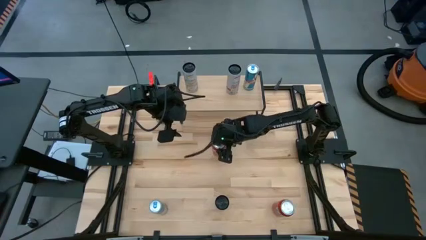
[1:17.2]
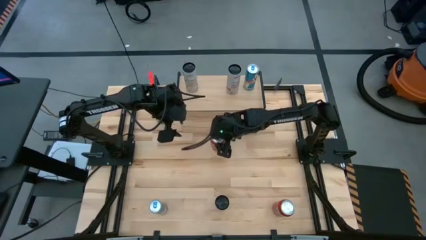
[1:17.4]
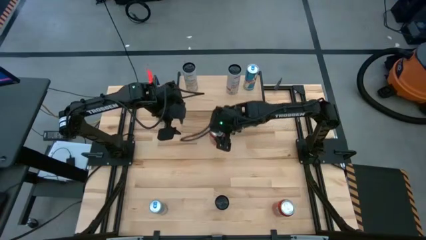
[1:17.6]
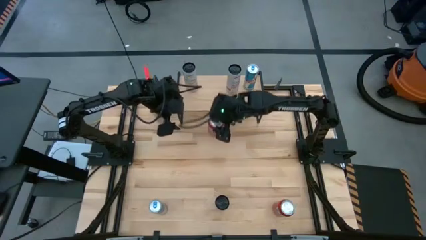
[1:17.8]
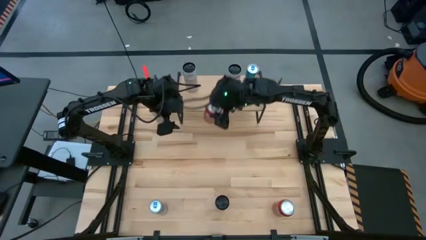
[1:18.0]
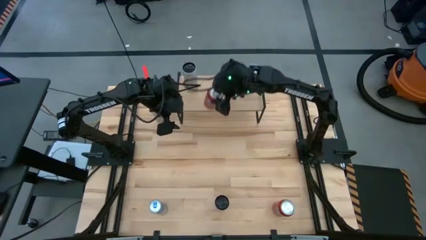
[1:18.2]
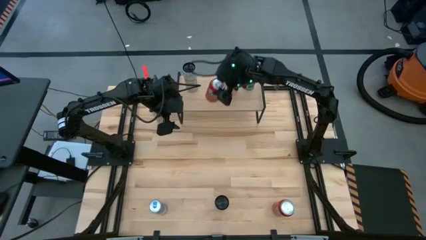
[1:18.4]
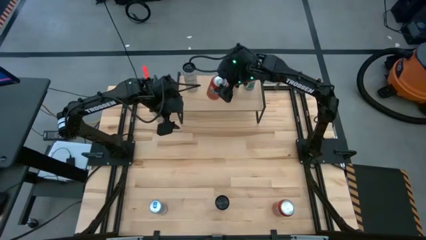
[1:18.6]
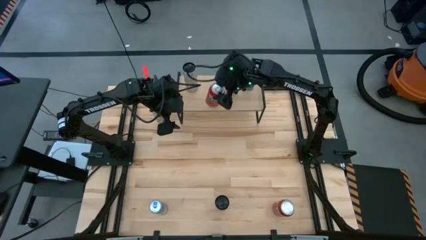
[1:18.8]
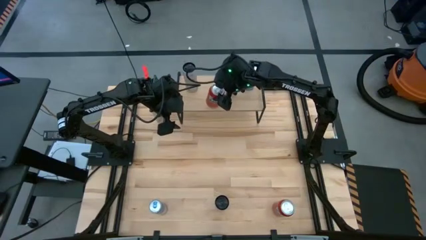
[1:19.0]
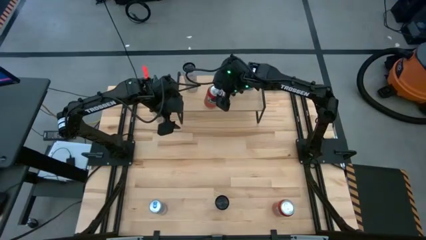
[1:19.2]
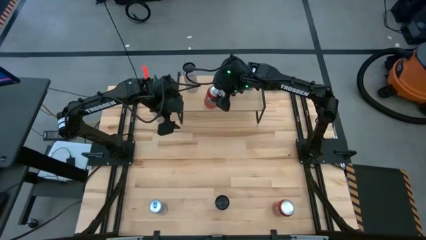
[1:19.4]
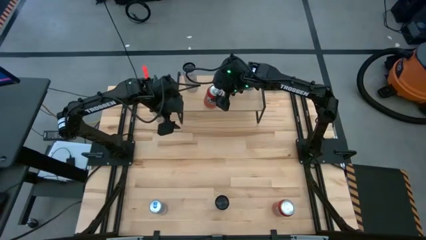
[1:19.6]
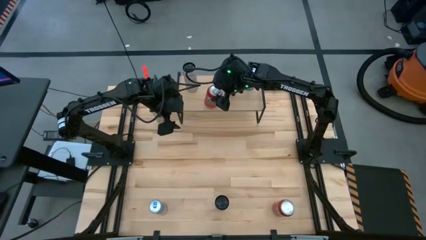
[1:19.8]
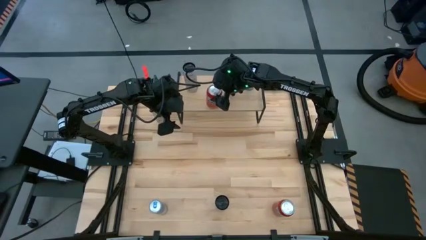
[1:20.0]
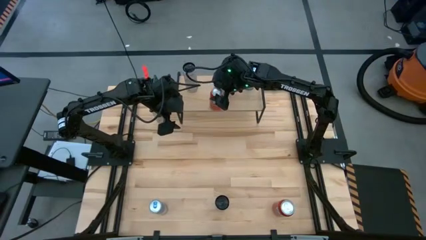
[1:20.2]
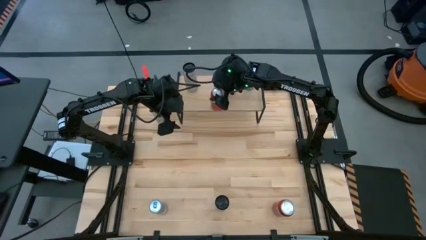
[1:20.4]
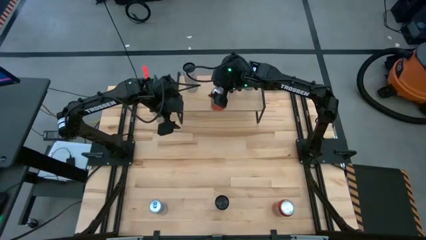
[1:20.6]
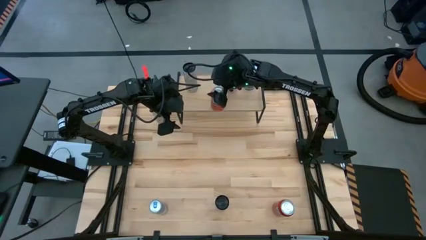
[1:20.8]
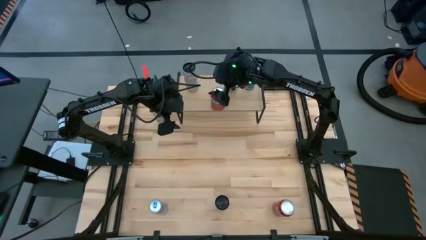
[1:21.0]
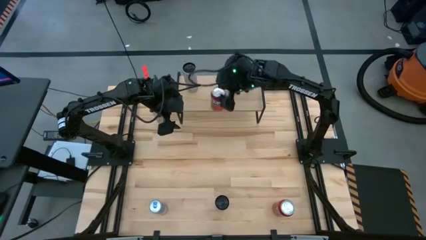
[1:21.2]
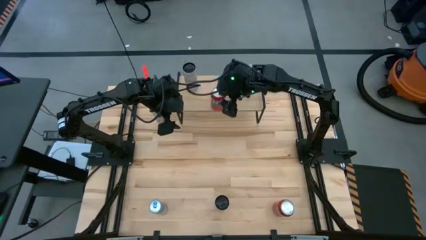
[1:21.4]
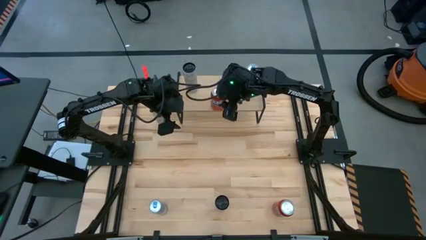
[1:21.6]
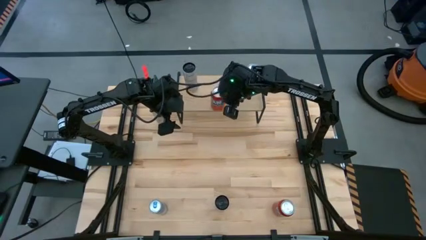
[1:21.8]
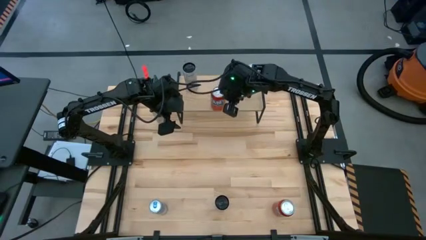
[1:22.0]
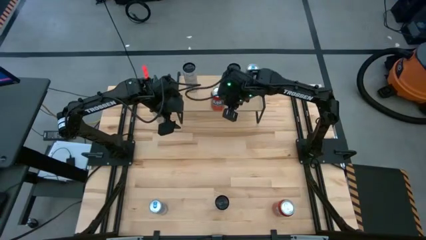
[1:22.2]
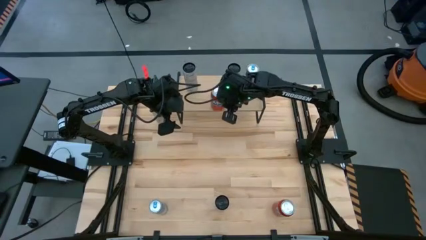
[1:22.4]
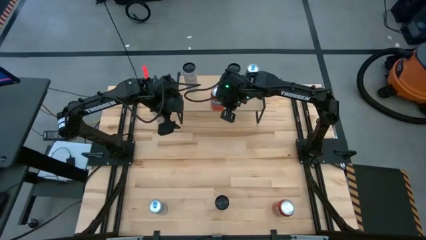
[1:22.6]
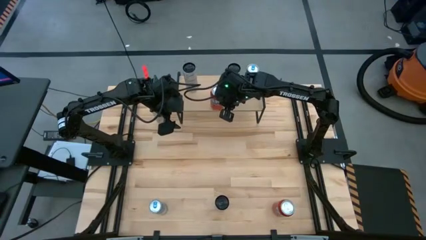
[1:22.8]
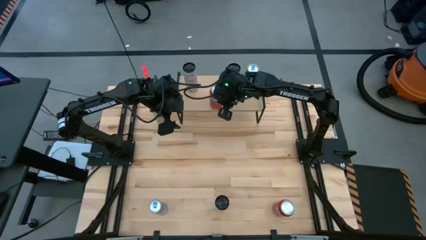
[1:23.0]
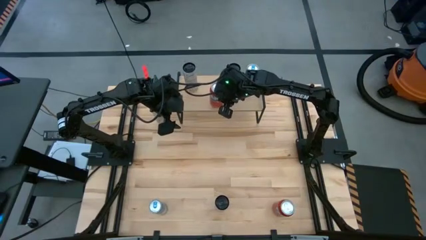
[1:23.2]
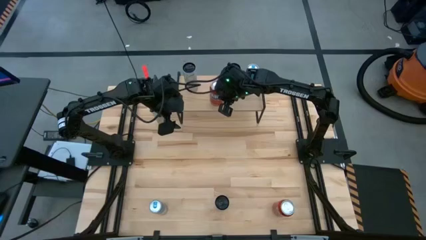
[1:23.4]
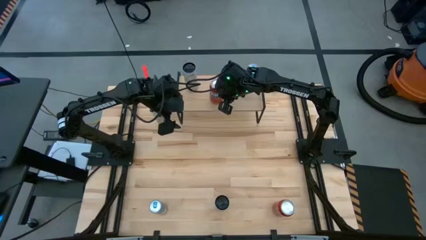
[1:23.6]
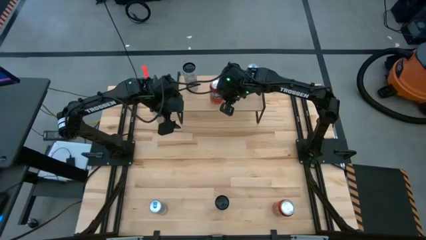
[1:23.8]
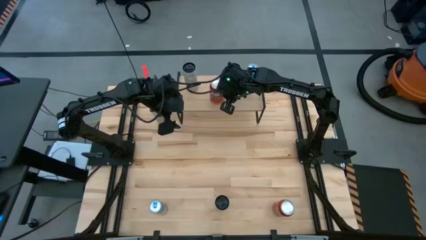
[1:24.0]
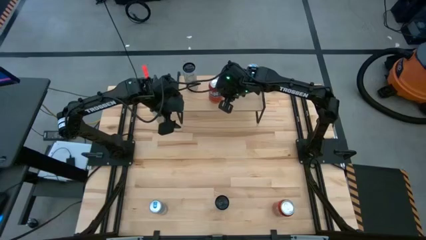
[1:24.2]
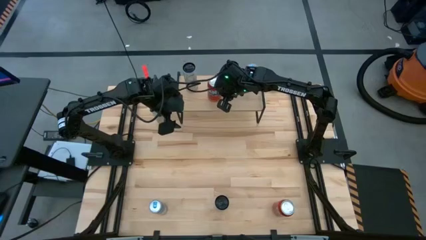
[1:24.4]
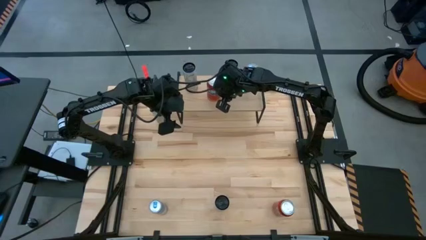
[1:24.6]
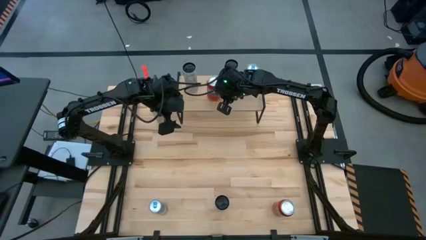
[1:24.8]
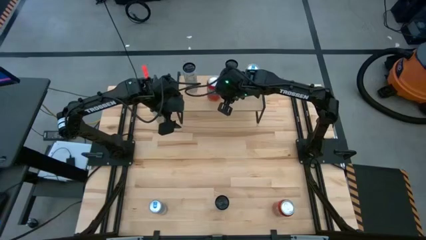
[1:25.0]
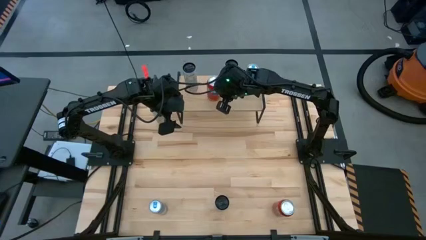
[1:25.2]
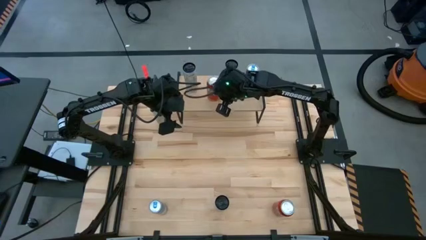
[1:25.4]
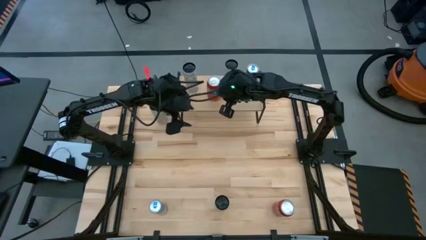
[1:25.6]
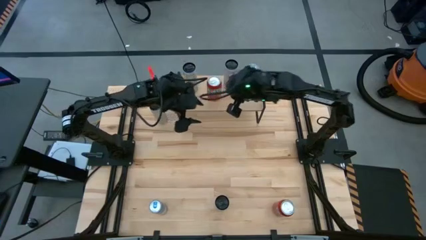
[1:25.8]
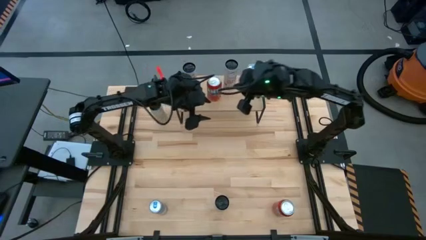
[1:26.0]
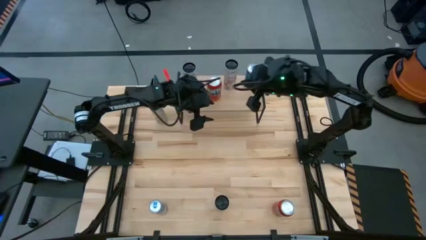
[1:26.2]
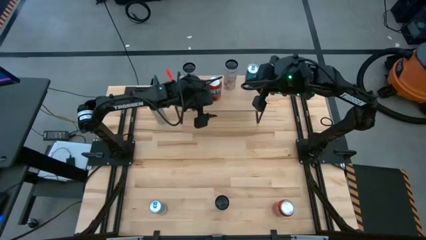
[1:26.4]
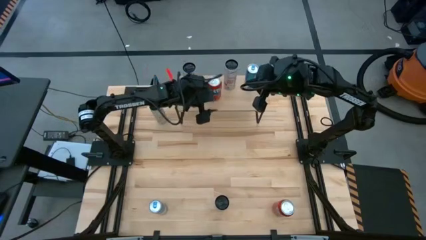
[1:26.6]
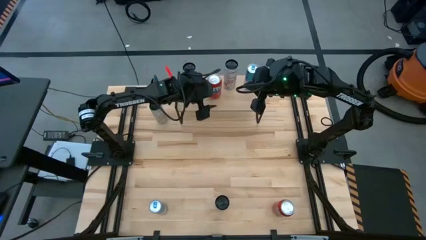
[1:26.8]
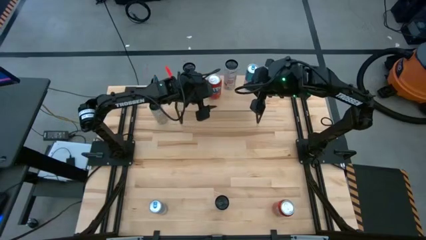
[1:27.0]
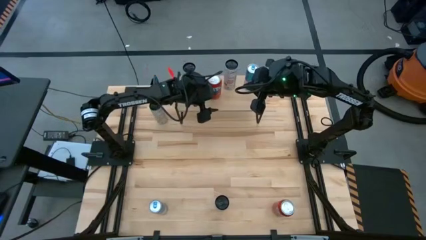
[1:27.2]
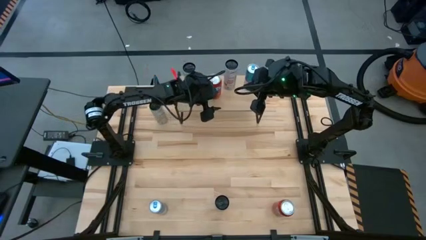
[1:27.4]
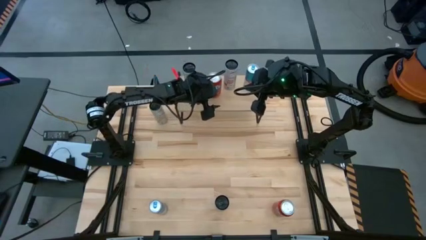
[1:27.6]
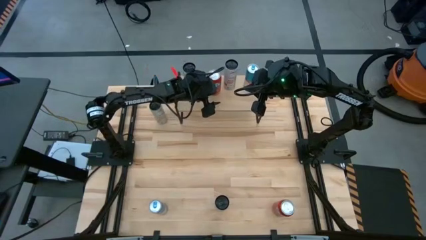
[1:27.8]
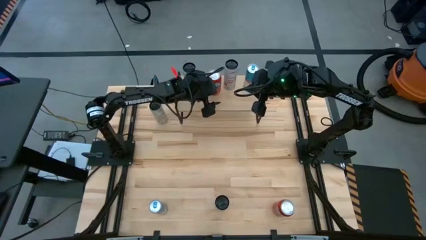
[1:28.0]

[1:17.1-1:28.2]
Task: Place canned beverage on shelf
Put the top red soda can on the shelf

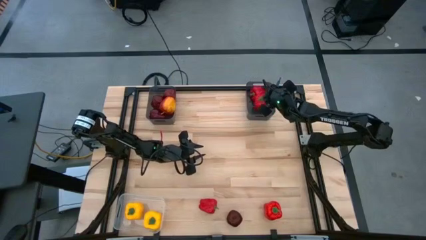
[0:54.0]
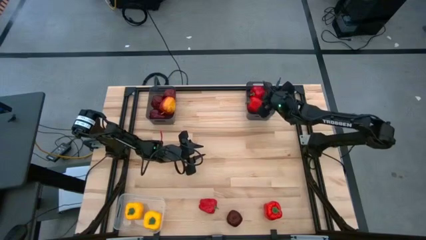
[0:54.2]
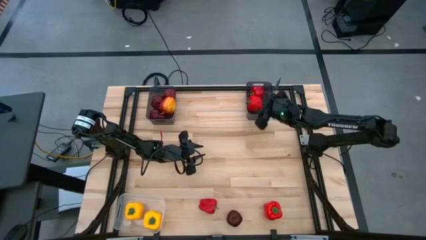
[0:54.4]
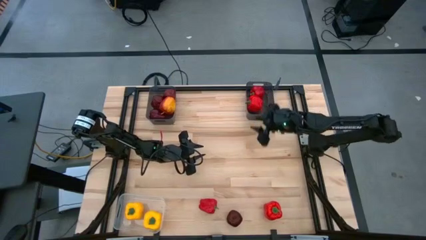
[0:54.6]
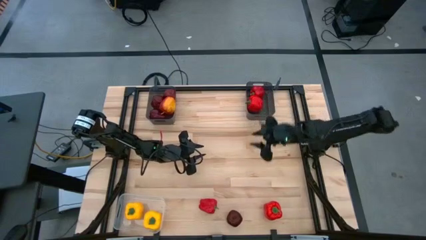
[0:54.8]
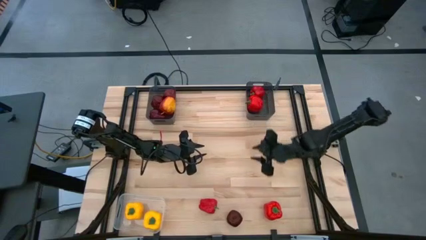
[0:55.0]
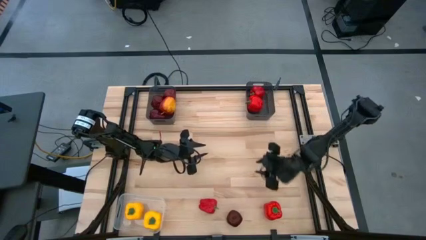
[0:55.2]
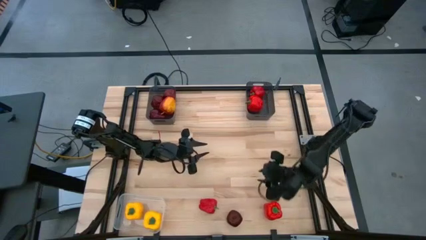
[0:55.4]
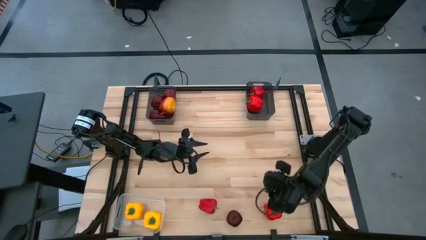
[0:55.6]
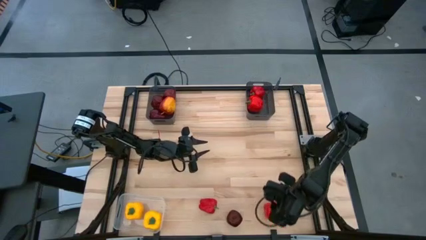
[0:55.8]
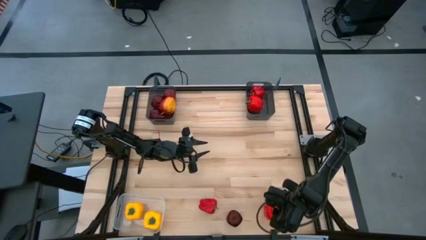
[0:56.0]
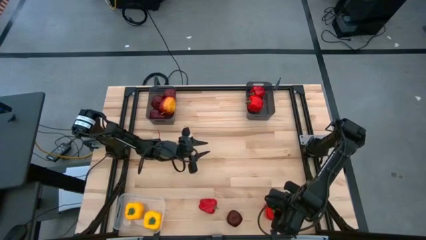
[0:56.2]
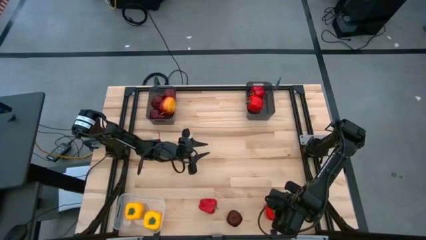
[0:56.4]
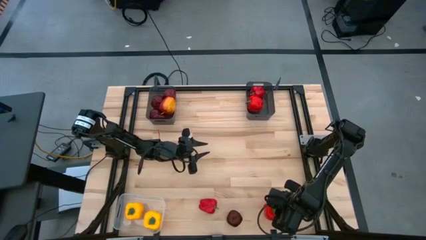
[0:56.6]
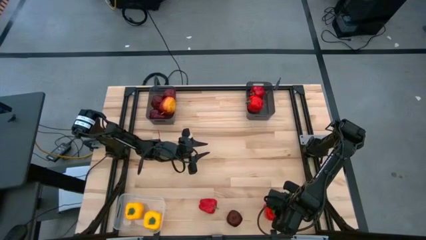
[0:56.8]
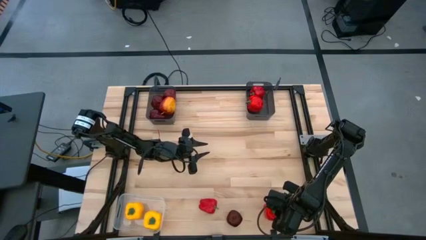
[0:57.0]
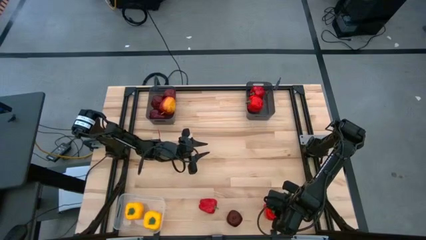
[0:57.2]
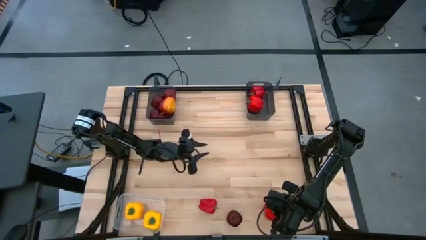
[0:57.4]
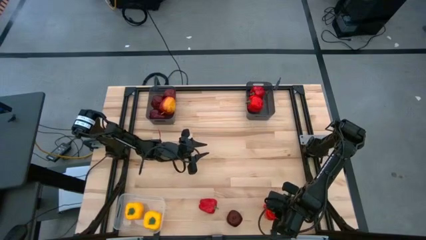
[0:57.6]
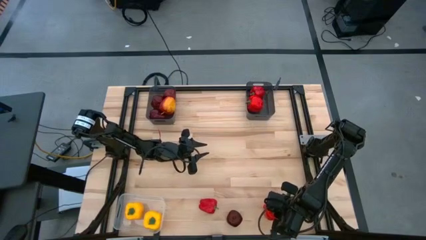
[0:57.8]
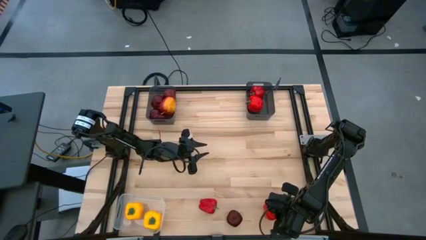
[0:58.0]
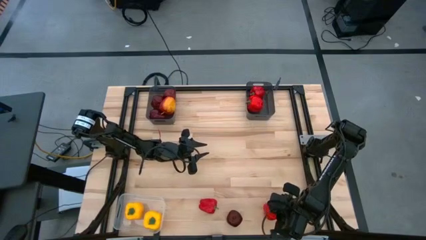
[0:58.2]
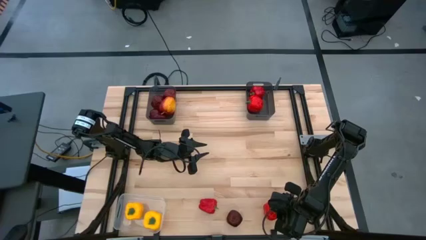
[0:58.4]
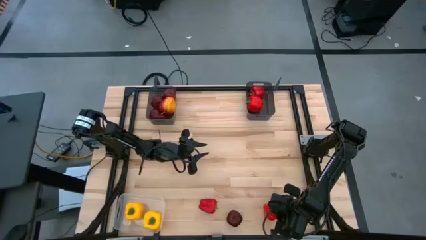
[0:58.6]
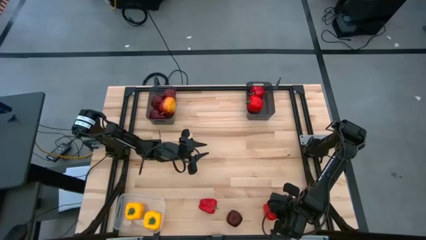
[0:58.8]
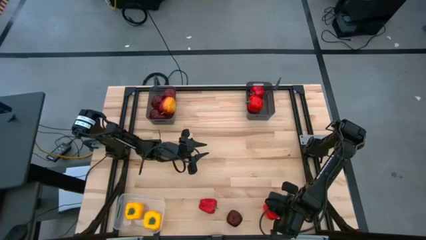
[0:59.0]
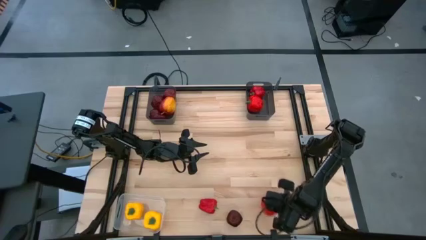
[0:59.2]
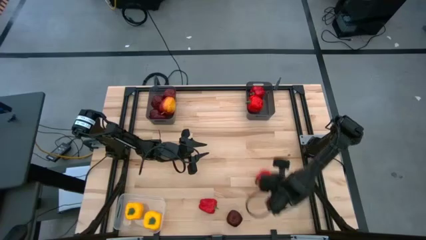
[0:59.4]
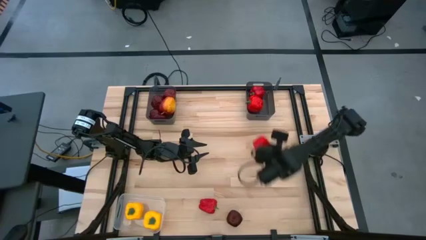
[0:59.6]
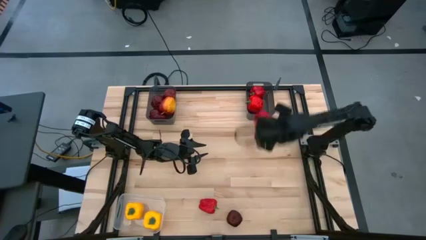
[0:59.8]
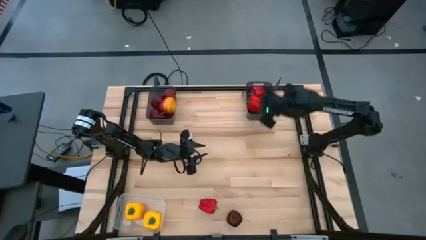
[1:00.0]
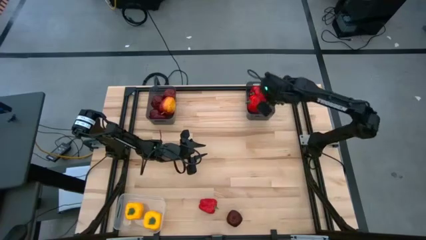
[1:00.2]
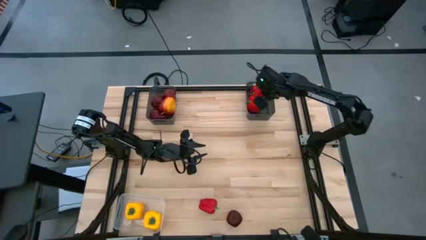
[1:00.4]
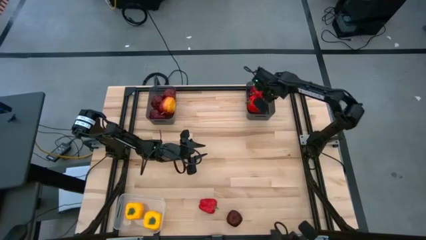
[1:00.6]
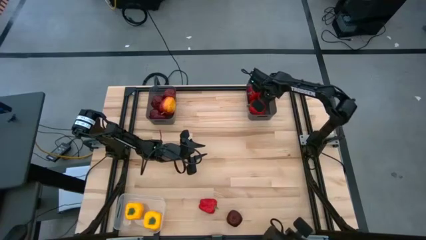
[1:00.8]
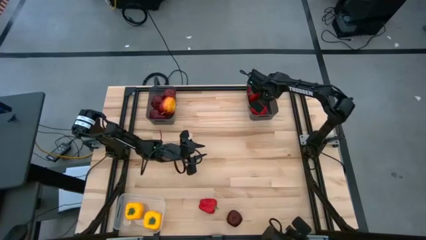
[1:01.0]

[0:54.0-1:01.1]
Task: Sort produce into baskets
Put the red bell pepper into the right black bin
